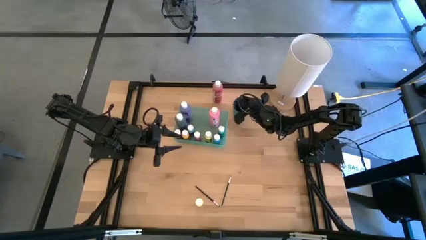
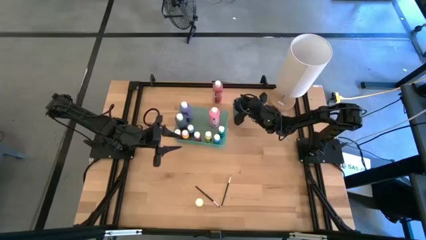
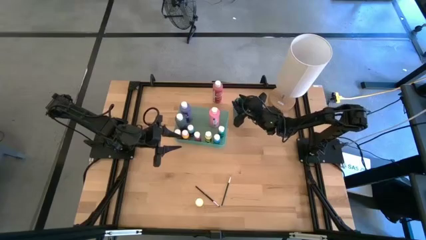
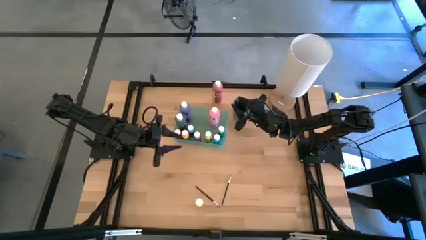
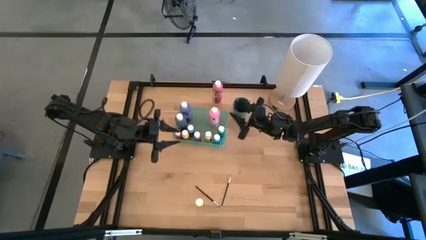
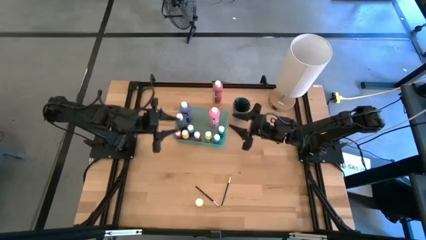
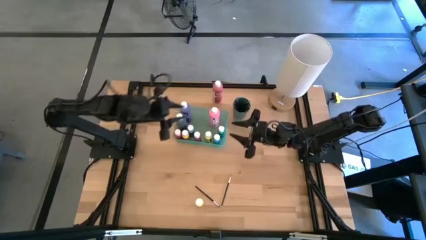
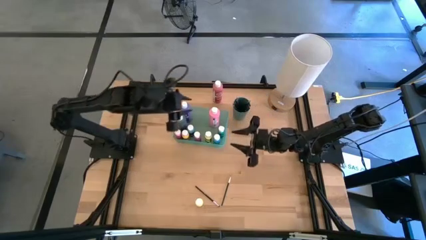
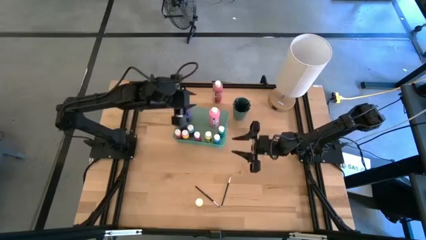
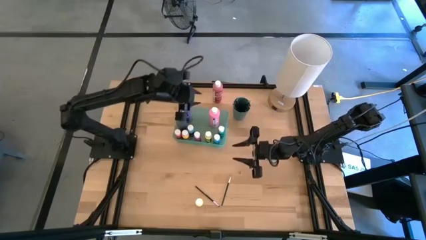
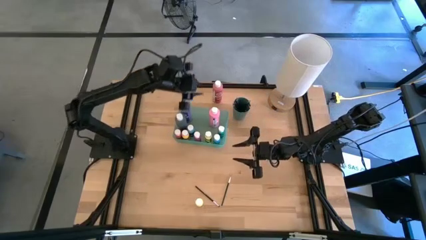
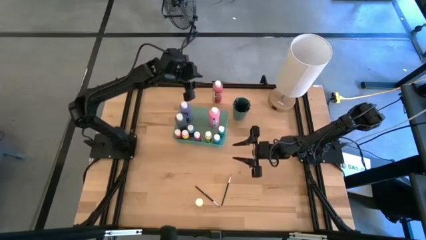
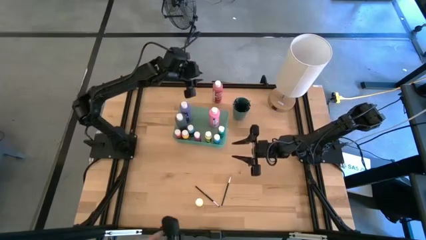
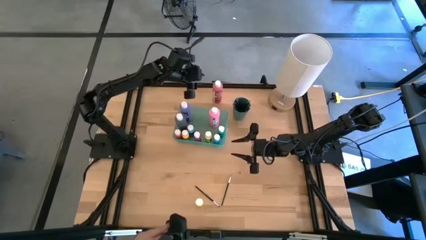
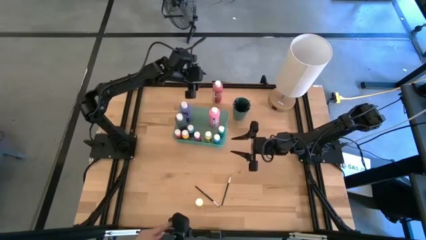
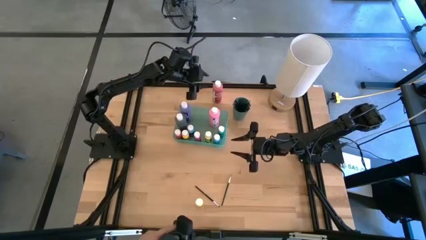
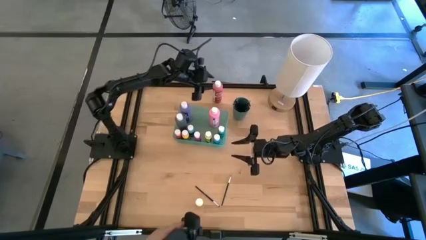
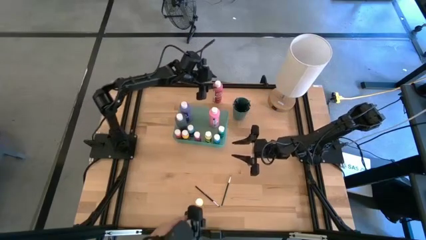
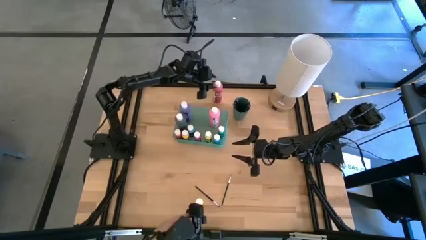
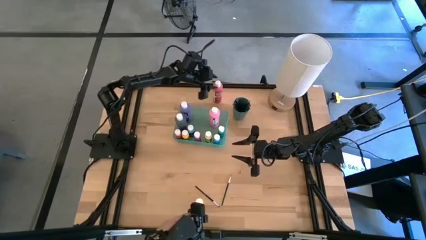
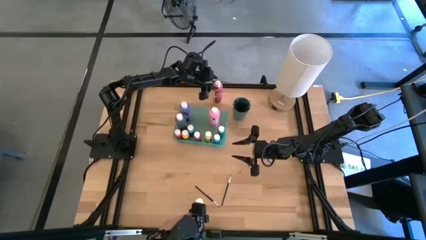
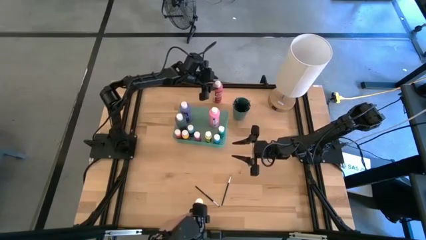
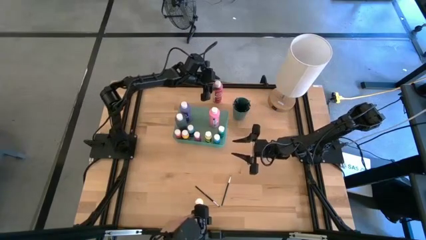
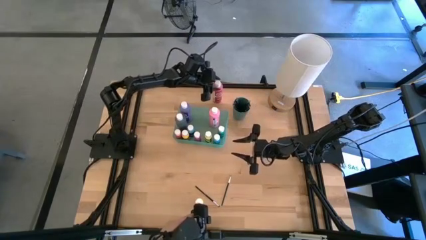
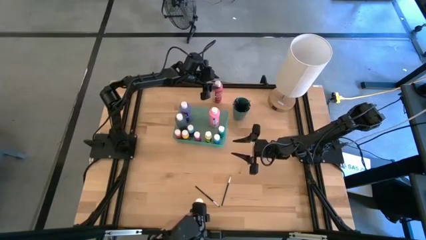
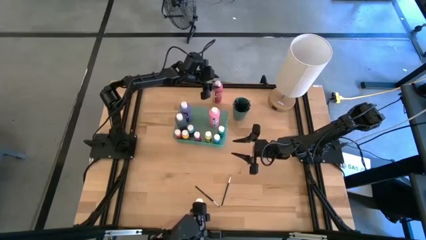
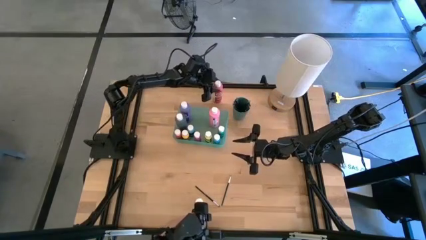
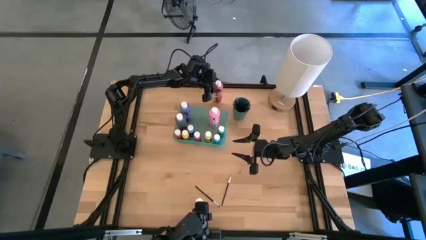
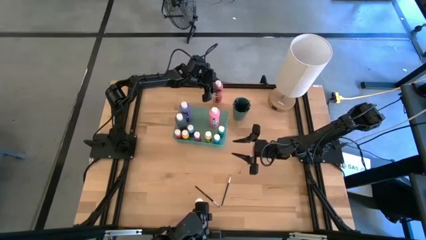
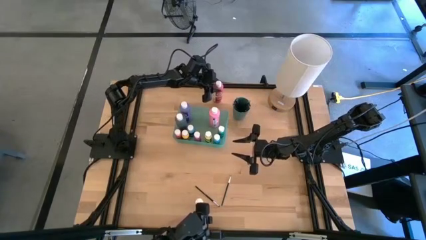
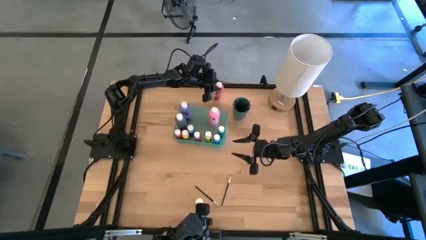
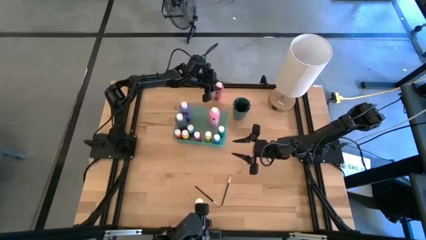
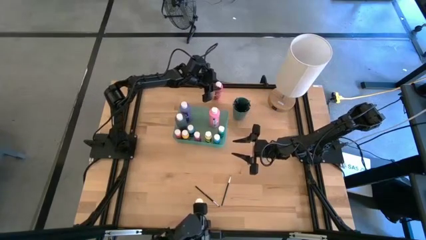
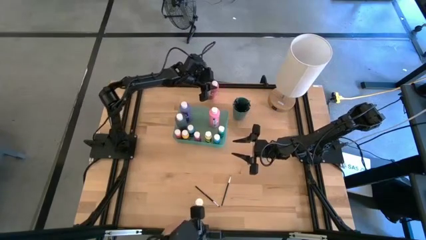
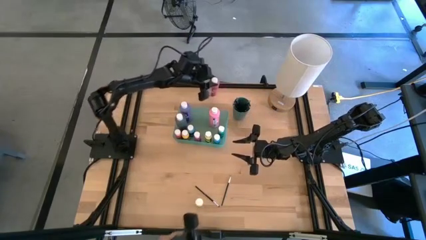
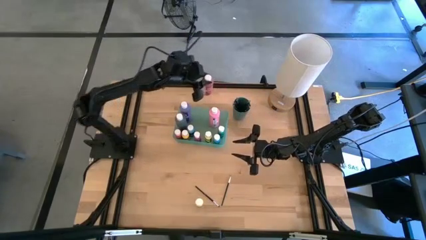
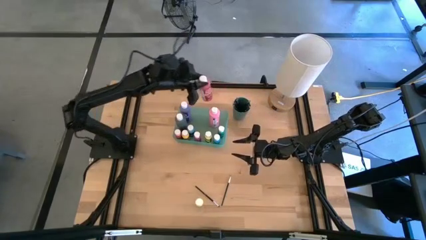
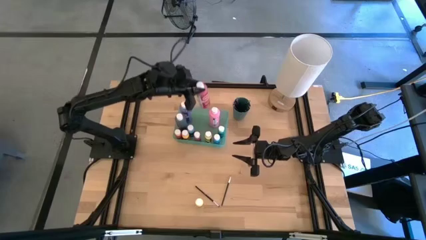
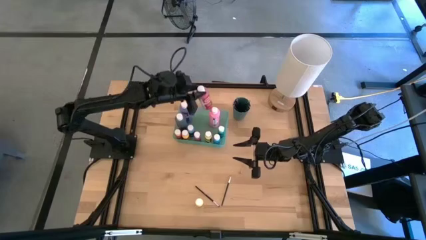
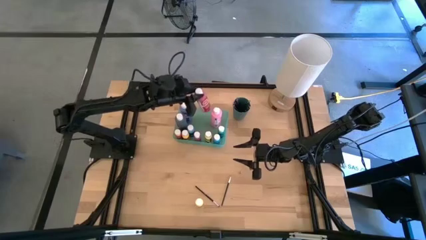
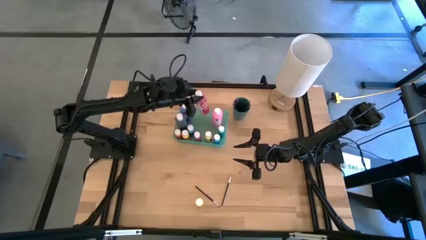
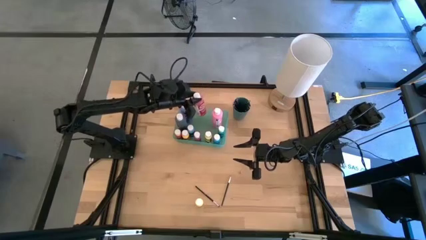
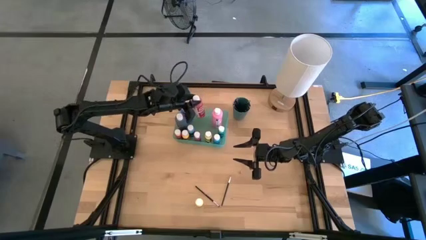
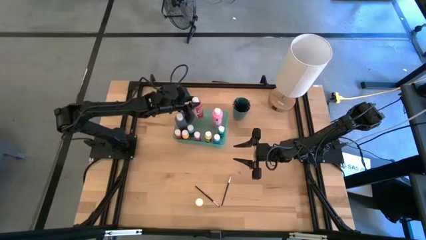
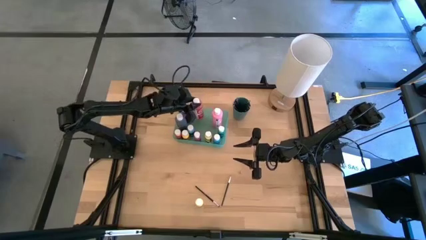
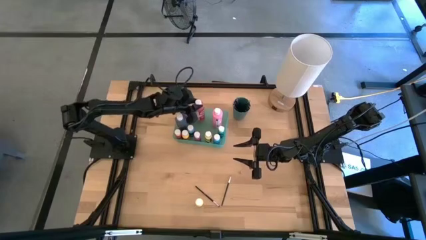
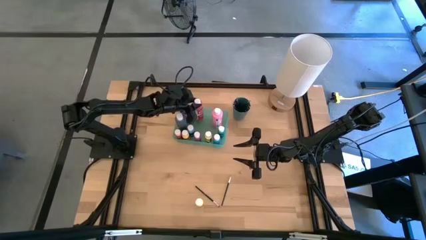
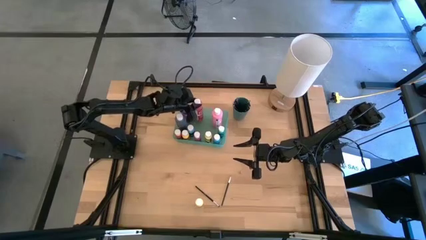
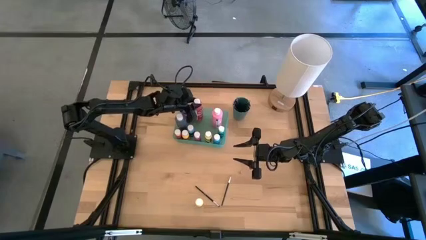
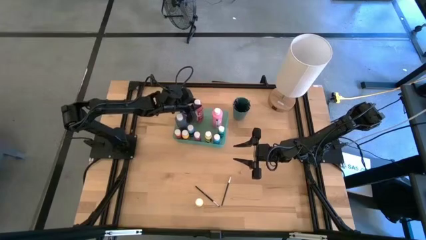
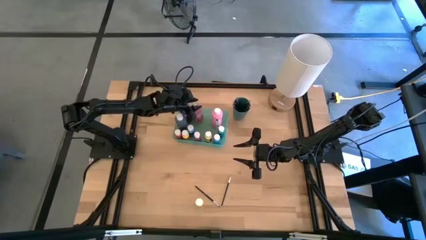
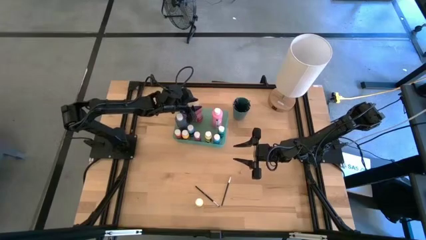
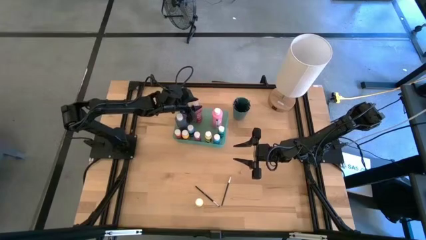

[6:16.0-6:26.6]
Task: Pick & Place Paint Supplies
Put the big dark pink paint bottle into the green bin
